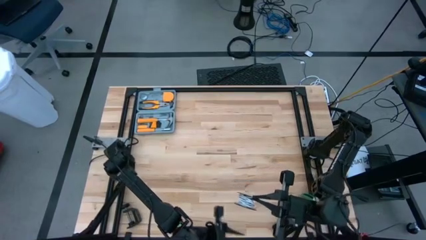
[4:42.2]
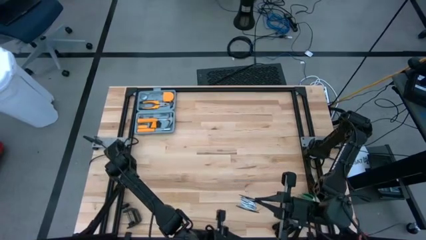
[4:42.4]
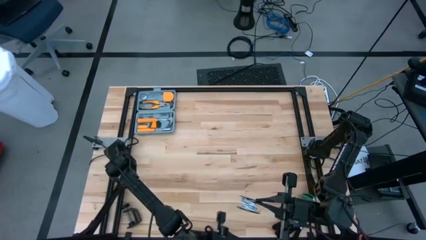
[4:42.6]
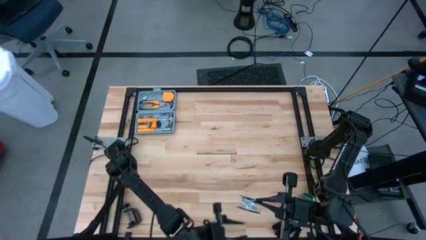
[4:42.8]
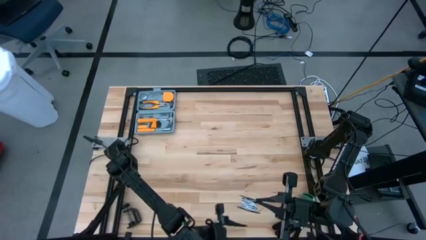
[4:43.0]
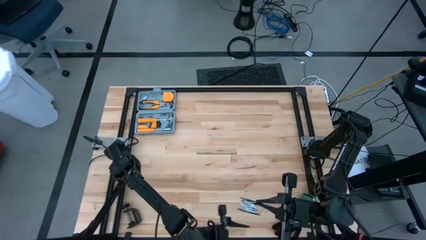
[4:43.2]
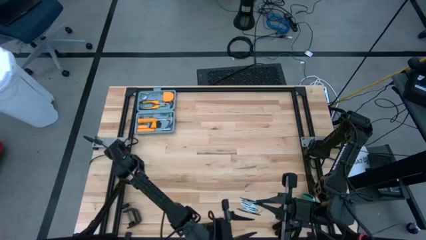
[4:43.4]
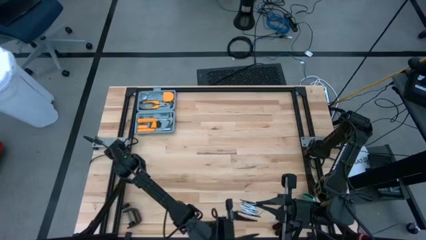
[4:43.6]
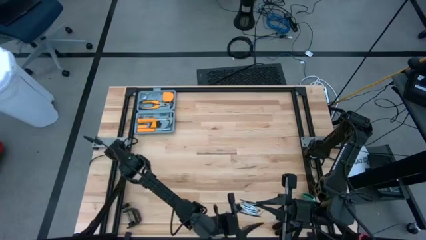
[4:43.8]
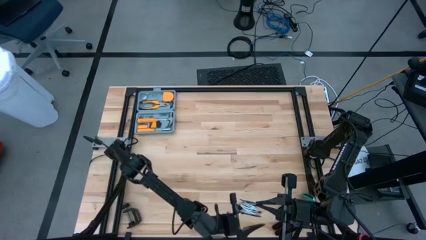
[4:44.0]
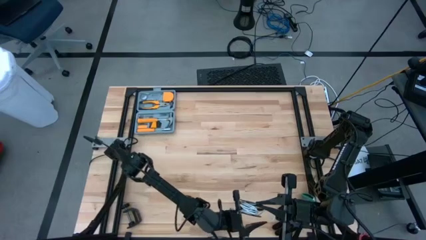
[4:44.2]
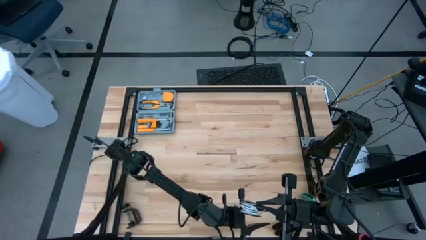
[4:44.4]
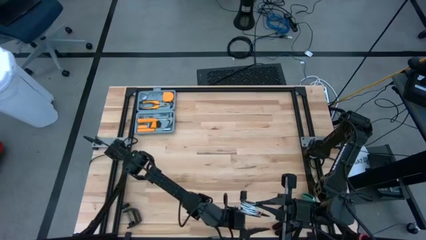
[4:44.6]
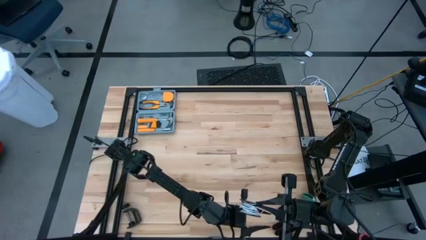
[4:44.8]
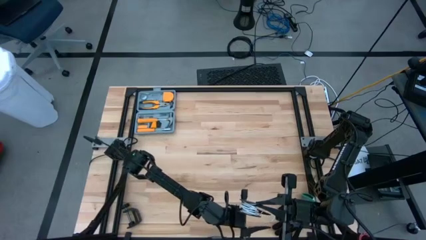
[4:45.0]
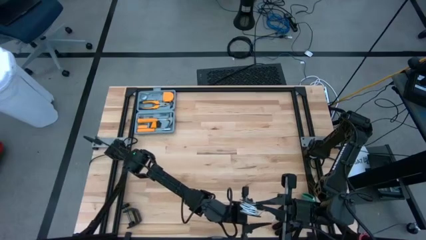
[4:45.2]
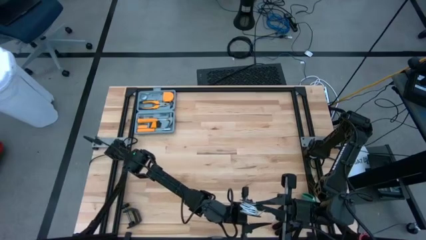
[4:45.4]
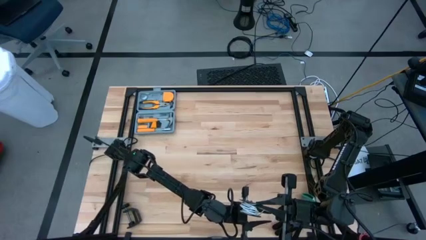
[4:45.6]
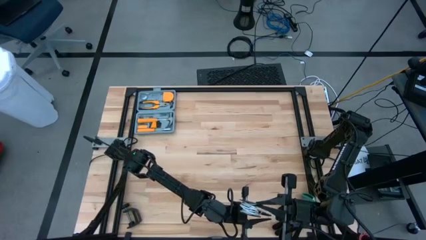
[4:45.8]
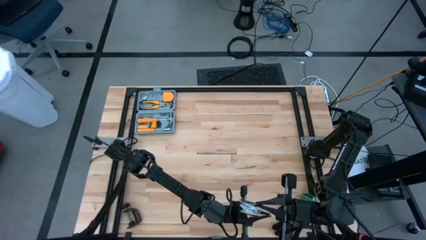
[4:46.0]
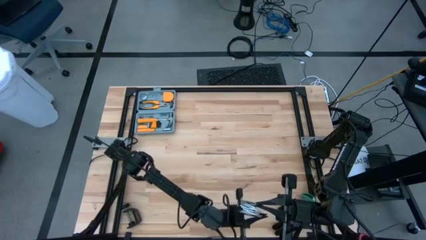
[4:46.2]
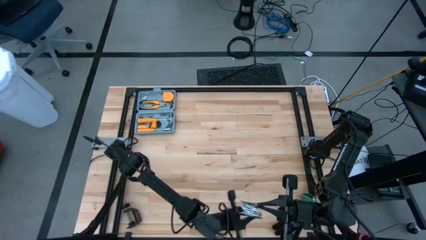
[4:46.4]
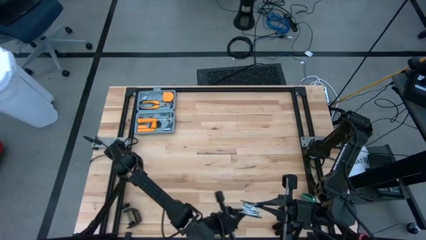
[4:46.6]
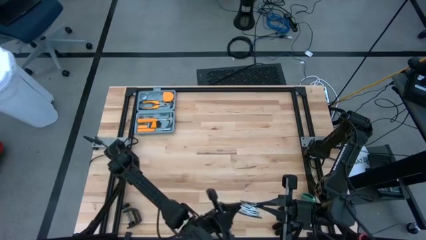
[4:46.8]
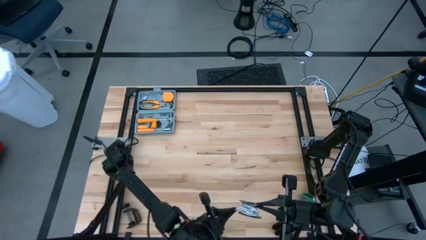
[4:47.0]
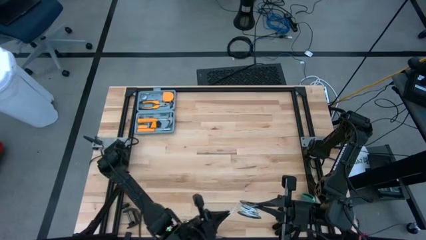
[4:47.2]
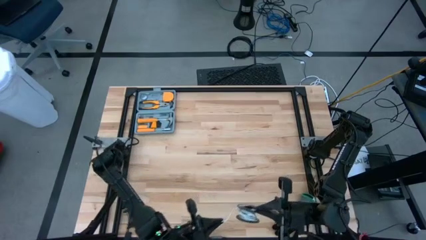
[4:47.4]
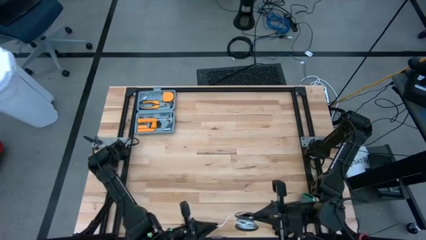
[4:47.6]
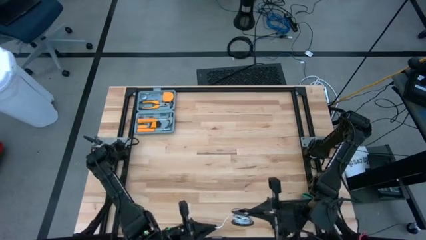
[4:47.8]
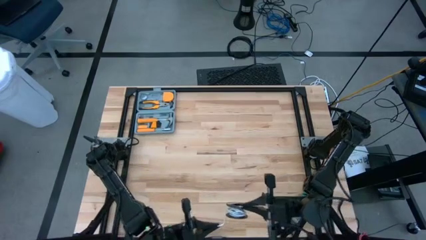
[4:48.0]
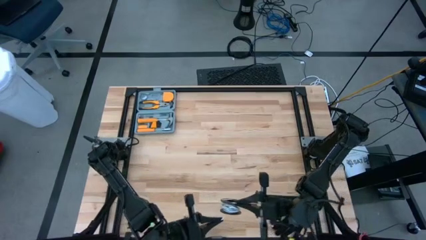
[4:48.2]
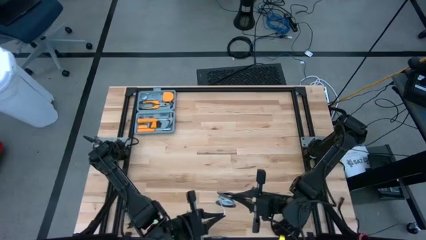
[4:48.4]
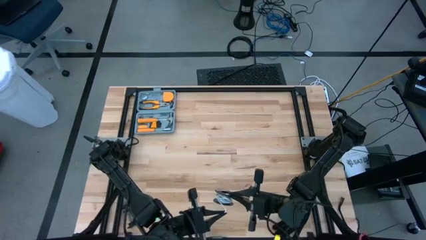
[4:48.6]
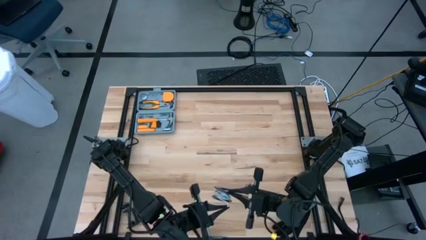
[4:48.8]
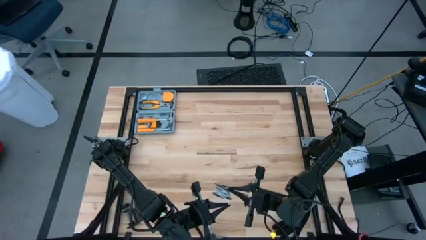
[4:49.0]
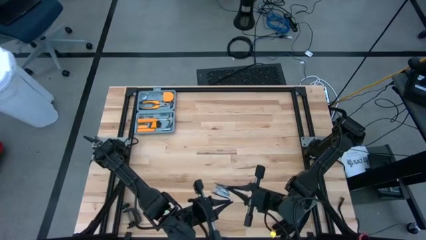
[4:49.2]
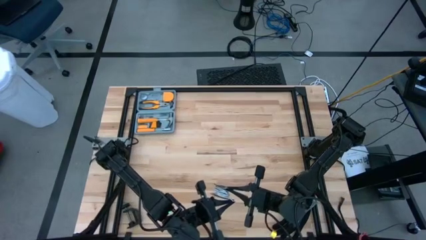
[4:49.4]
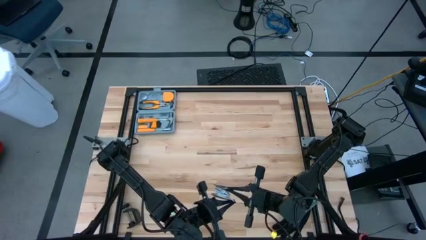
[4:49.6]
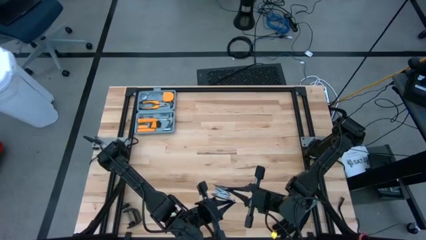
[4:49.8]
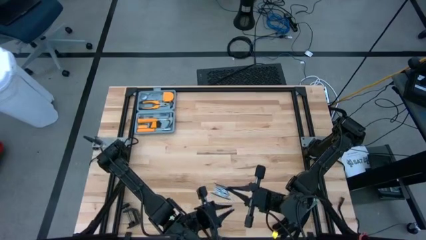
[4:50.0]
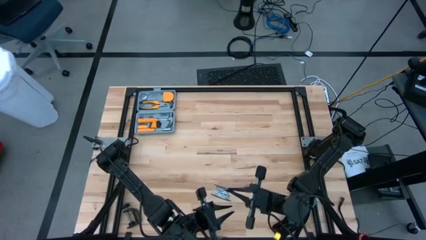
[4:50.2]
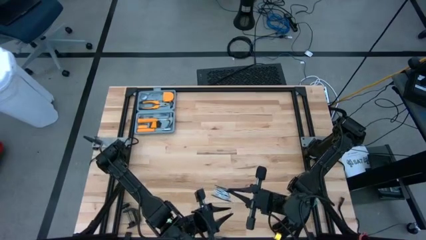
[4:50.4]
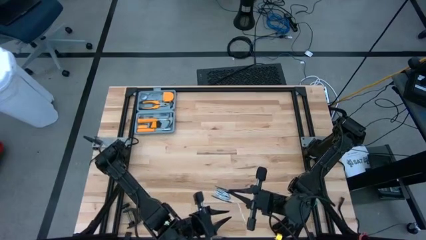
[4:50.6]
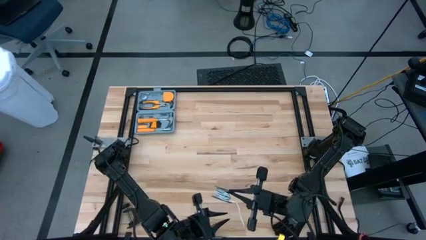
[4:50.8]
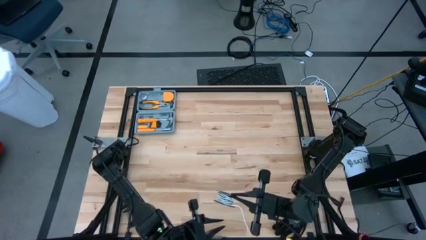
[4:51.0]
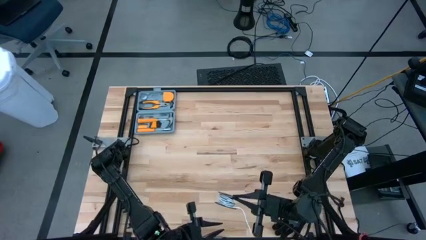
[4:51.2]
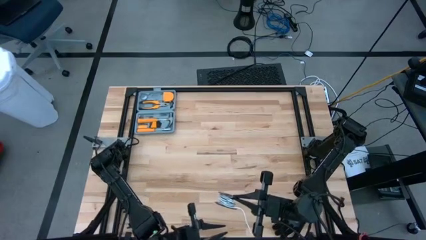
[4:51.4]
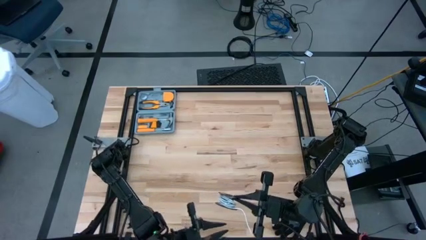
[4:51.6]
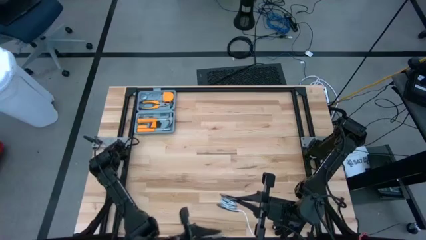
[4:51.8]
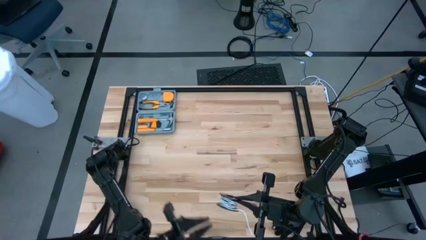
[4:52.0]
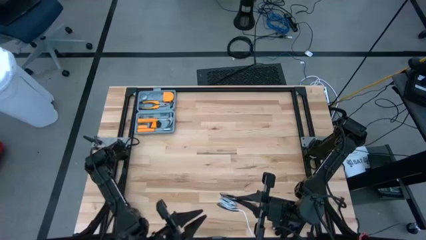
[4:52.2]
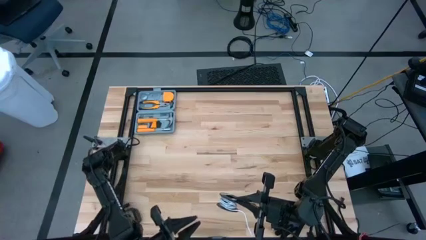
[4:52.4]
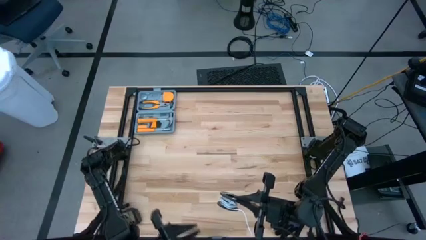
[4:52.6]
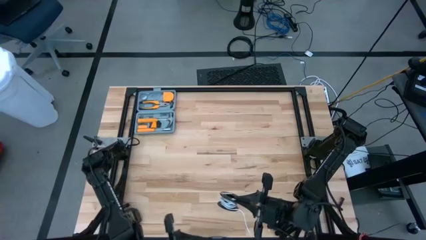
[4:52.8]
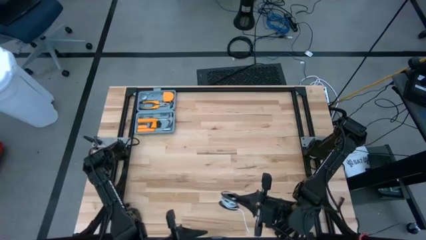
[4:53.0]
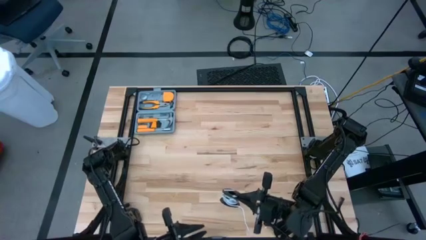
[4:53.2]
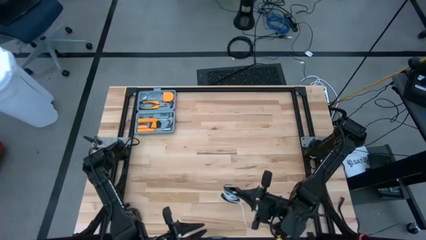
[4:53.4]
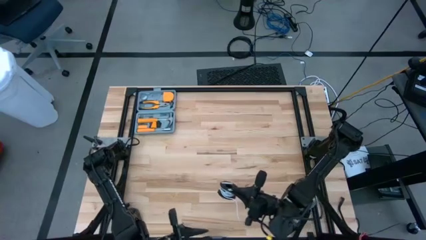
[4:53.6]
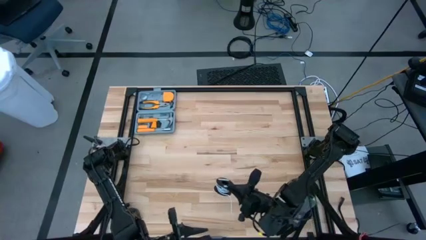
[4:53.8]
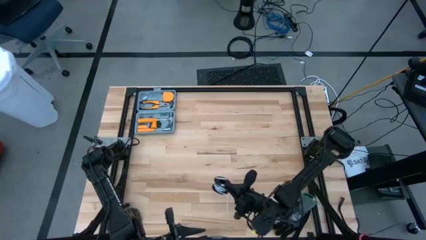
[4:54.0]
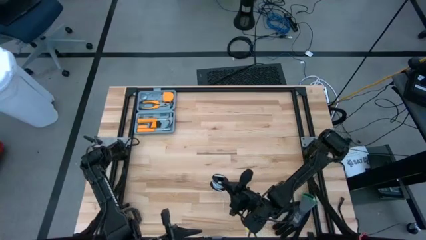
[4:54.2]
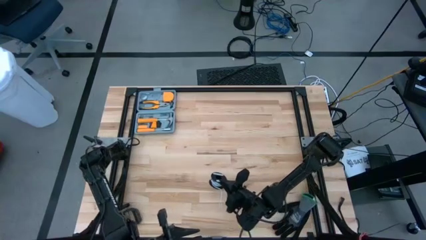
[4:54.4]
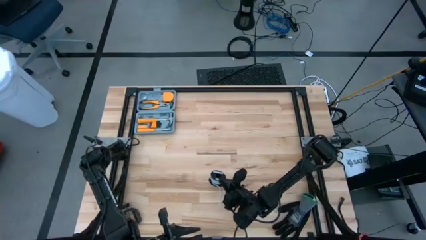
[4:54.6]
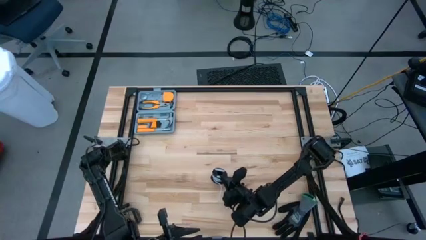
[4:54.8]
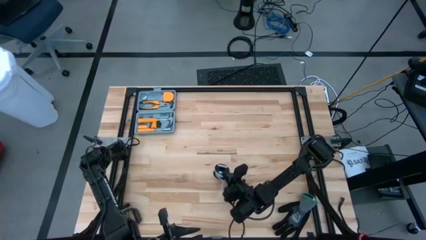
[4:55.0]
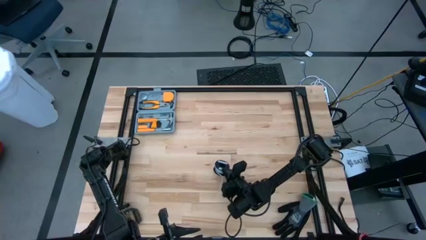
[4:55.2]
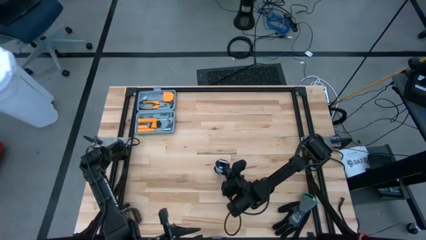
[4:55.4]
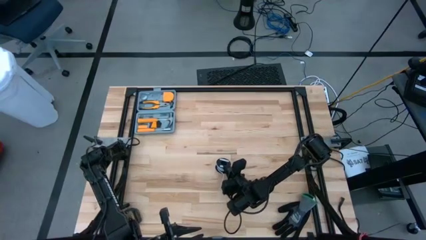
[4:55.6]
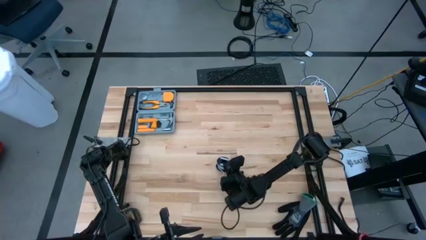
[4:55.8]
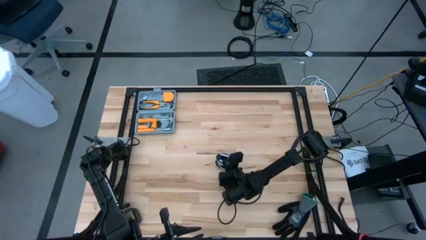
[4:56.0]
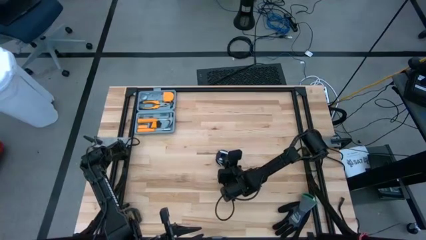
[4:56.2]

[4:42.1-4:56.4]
Task: Coil cords
Coil the white wire on the spool
